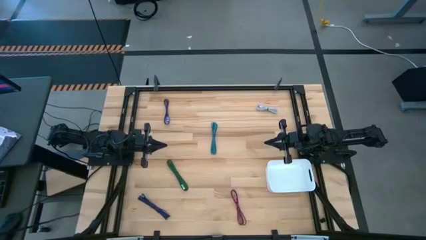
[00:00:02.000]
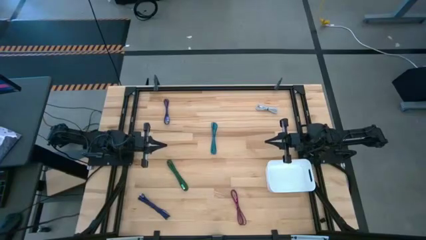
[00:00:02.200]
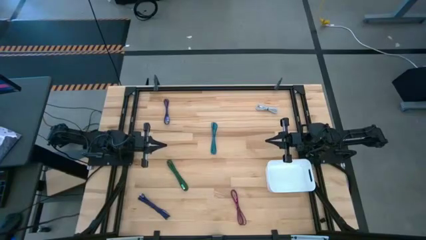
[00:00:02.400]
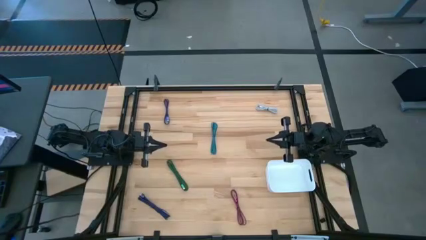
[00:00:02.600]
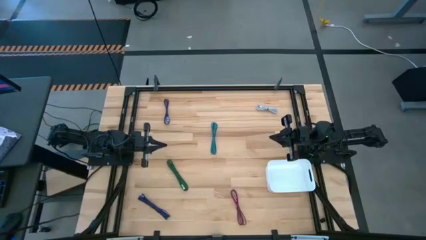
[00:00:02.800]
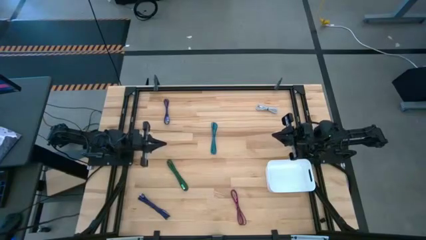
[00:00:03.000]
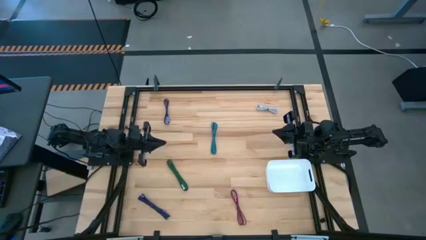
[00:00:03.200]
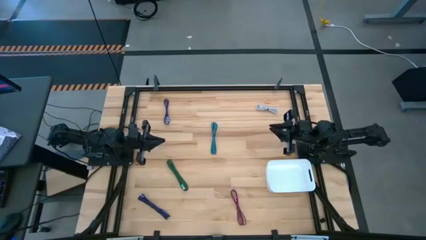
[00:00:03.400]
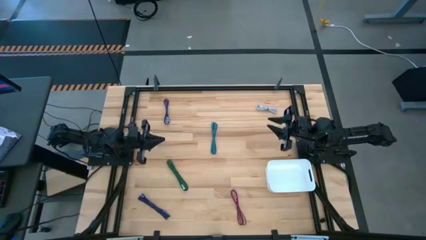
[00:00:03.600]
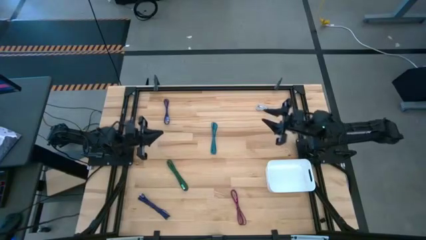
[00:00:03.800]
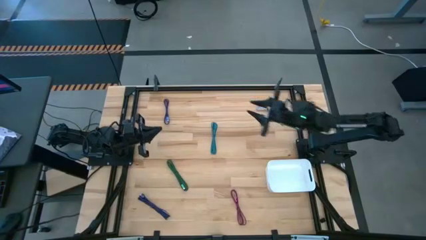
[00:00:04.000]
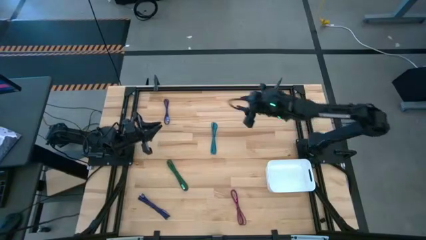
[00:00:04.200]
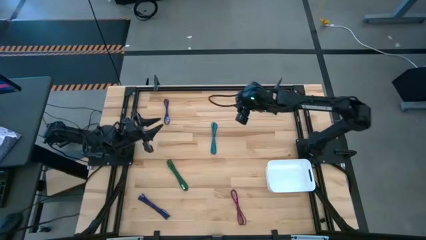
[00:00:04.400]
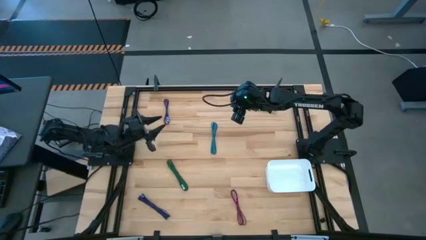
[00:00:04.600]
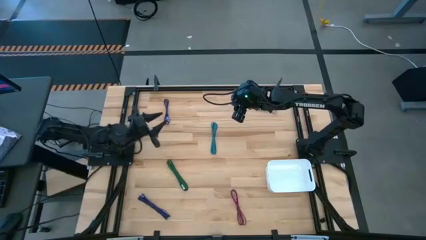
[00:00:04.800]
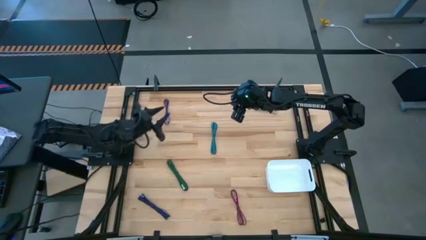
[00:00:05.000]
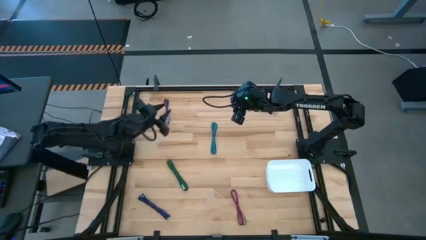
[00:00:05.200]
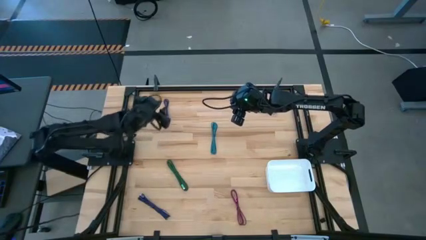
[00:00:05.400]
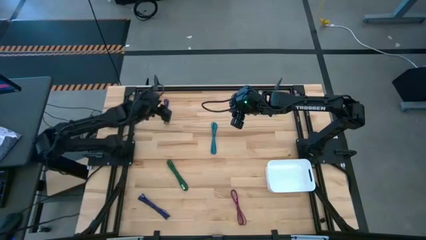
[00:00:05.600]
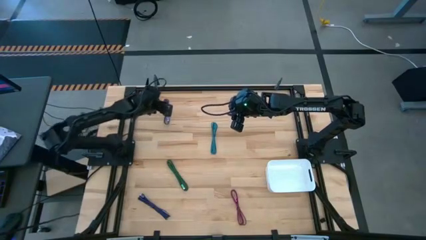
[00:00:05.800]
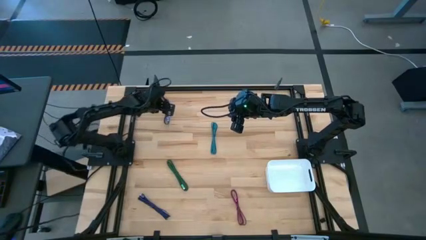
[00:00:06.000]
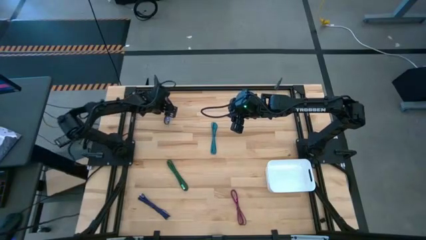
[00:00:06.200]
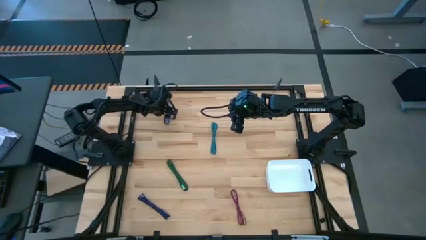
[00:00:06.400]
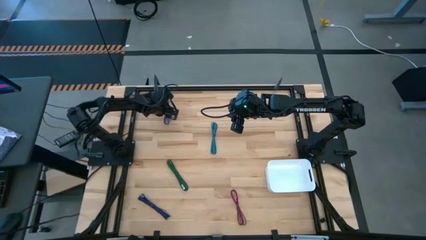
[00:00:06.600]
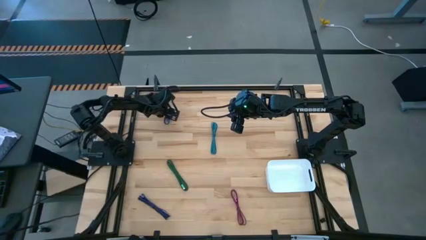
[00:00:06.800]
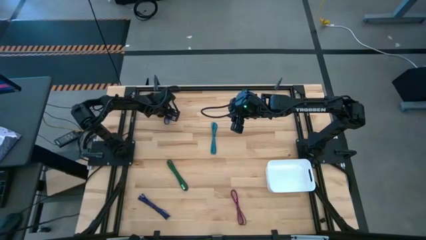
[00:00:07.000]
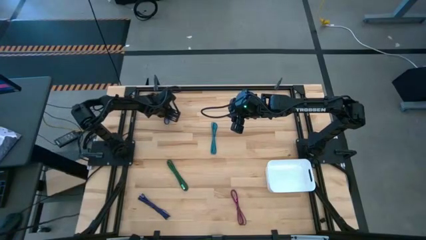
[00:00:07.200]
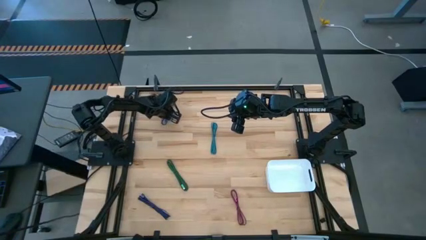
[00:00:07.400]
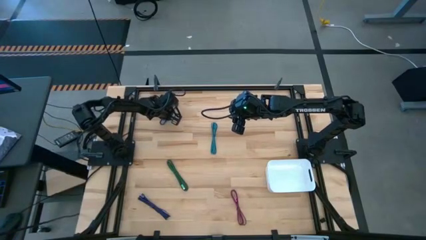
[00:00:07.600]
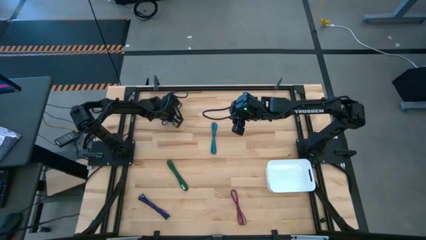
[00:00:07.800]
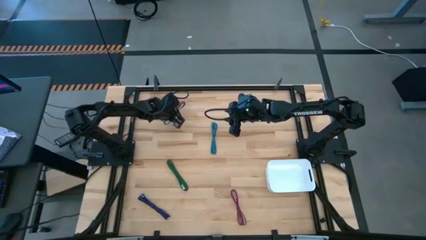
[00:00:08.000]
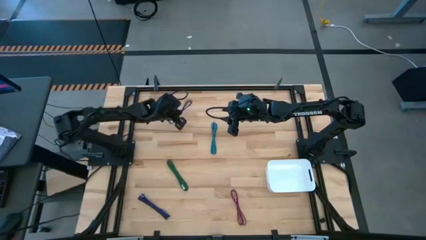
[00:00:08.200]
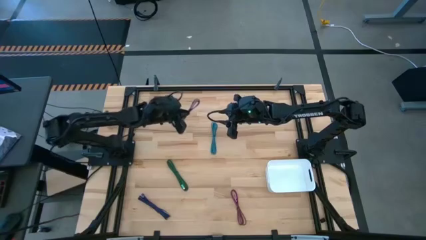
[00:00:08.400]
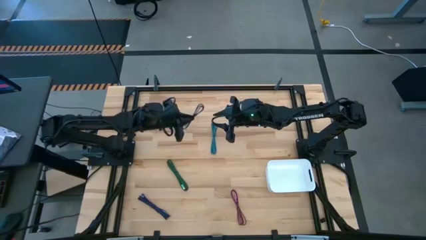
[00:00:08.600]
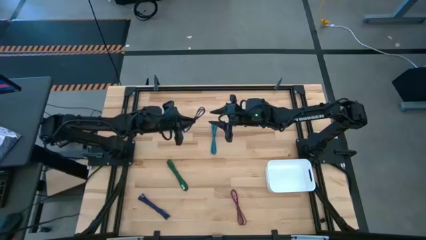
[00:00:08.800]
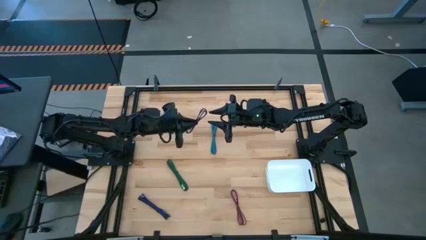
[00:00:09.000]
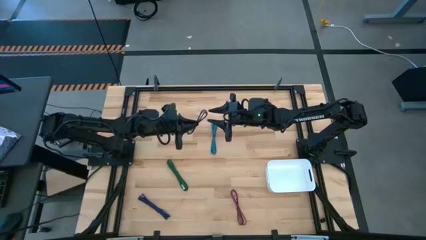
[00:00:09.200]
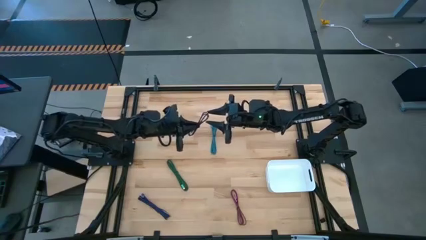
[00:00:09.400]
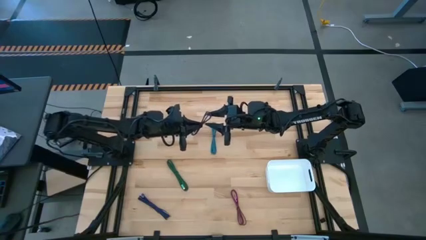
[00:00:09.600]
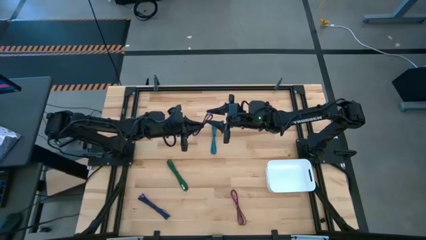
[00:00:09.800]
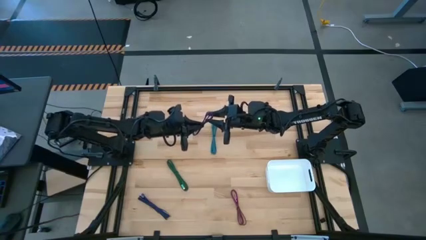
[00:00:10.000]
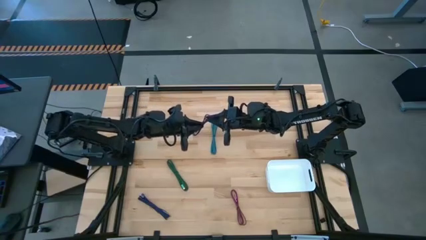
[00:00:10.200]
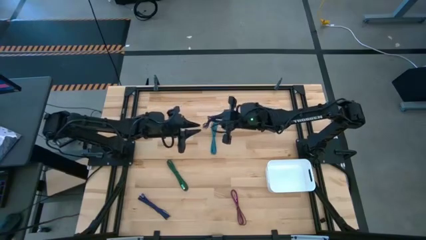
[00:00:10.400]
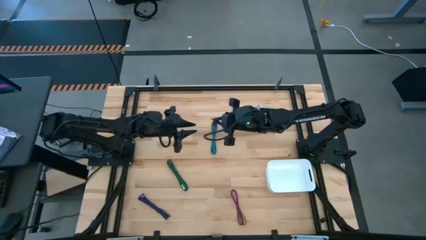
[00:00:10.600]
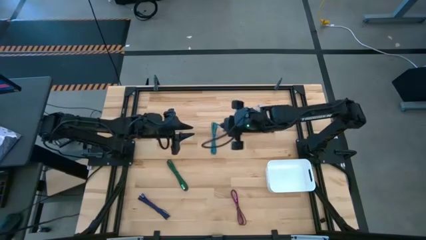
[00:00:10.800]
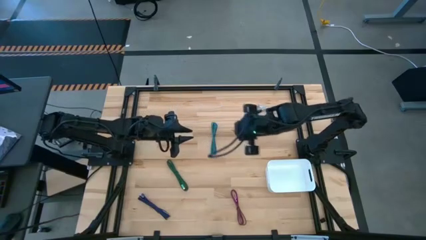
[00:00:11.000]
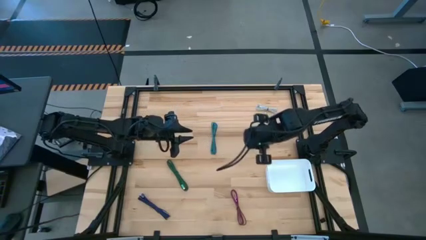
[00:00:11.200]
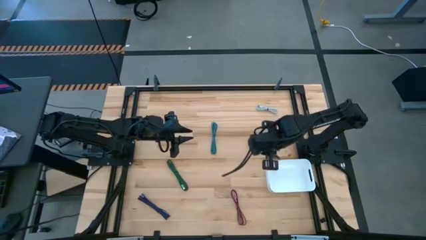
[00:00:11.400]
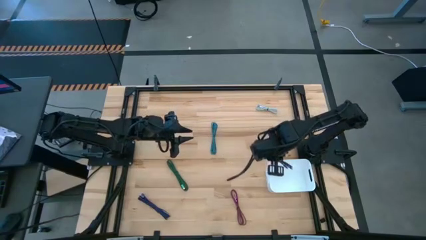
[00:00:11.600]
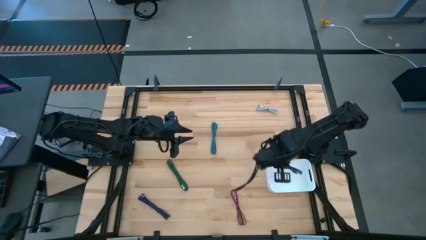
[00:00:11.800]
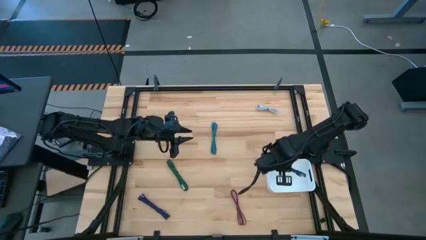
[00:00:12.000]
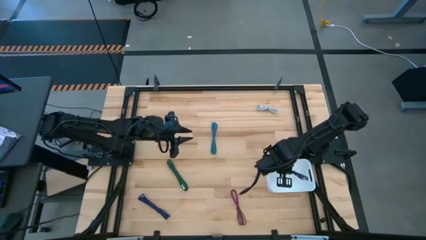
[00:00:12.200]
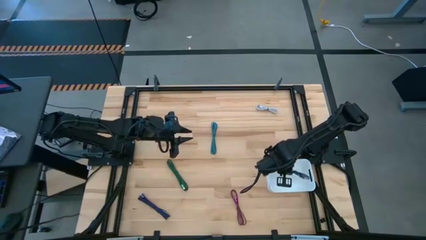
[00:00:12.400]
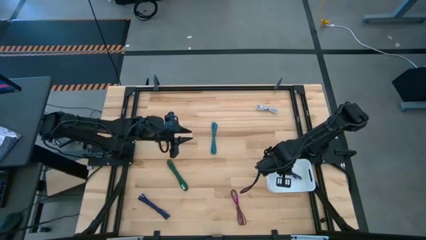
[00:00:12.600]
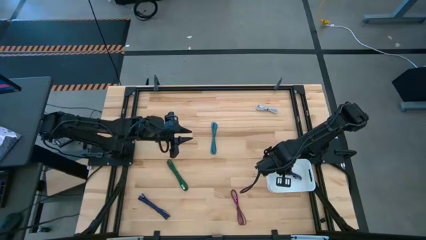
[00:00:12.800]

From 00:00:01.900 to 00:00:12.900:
Task: Pick and place USB-C Cables
Put the top violet charger cable into the white container

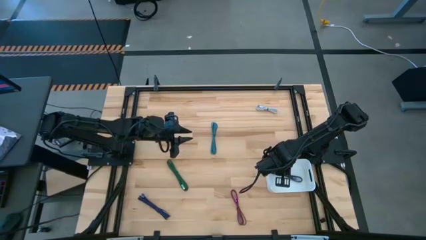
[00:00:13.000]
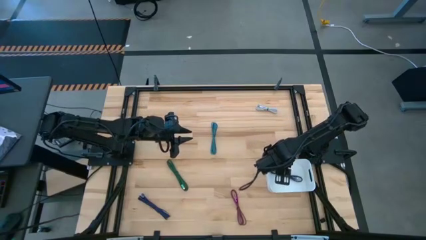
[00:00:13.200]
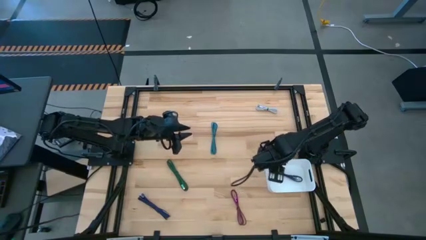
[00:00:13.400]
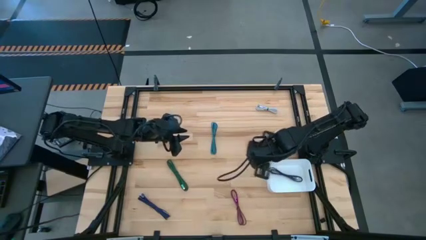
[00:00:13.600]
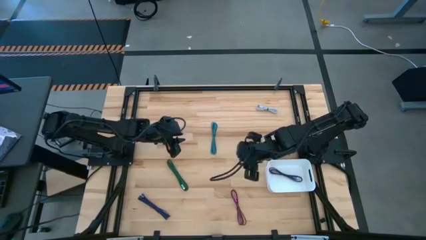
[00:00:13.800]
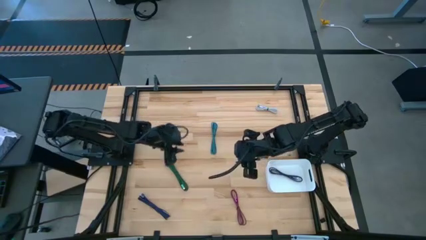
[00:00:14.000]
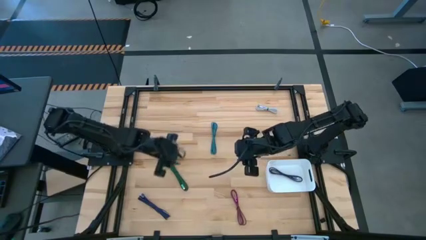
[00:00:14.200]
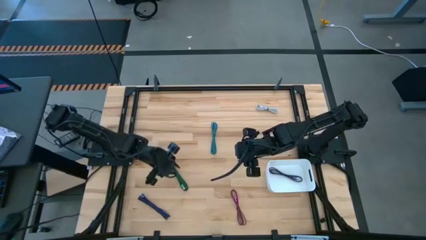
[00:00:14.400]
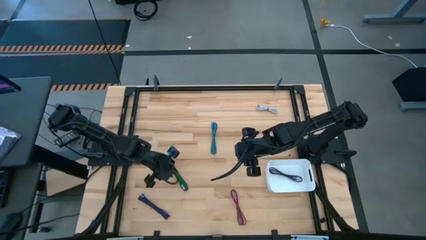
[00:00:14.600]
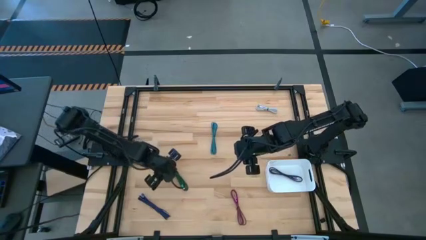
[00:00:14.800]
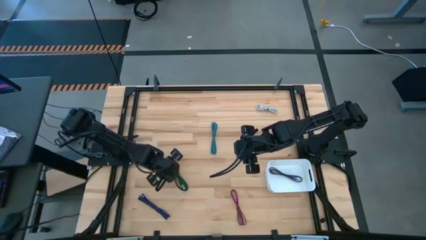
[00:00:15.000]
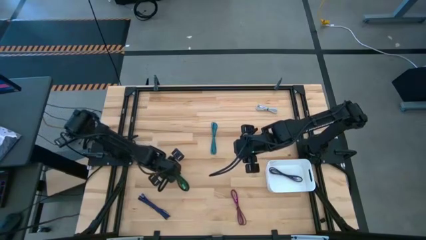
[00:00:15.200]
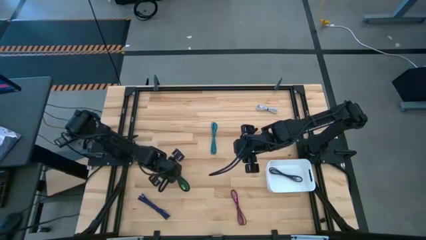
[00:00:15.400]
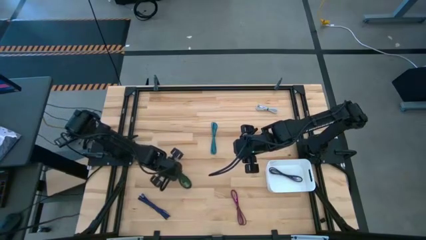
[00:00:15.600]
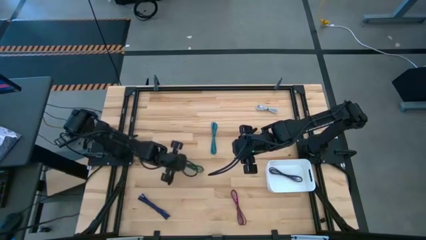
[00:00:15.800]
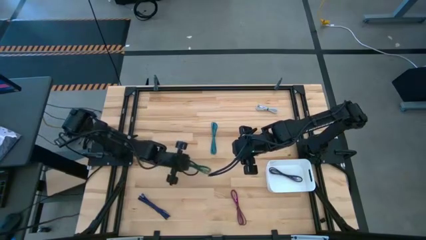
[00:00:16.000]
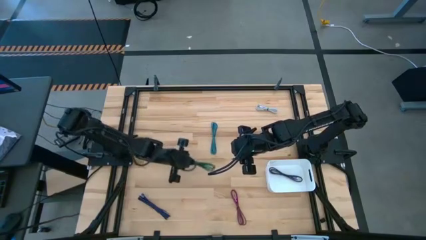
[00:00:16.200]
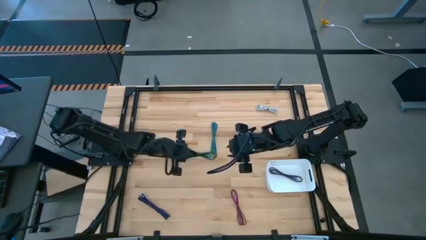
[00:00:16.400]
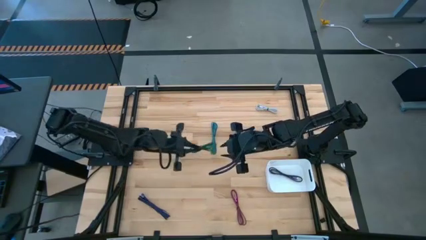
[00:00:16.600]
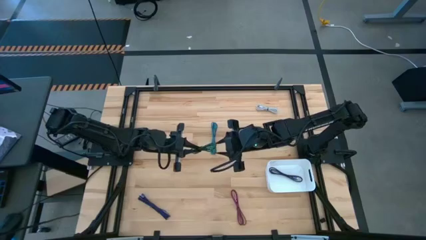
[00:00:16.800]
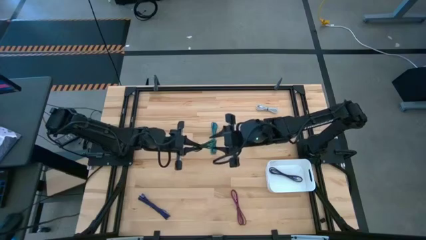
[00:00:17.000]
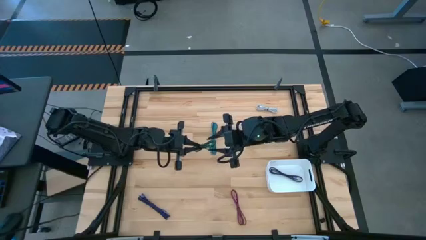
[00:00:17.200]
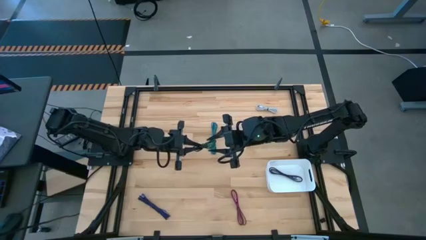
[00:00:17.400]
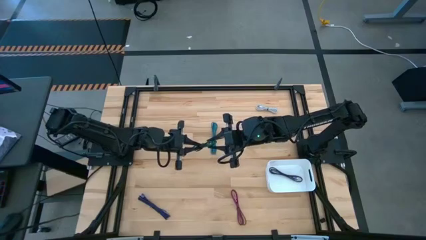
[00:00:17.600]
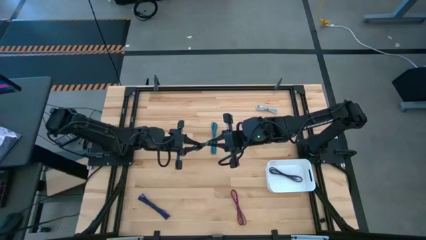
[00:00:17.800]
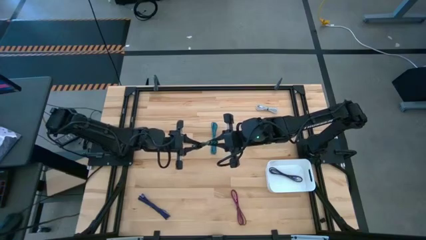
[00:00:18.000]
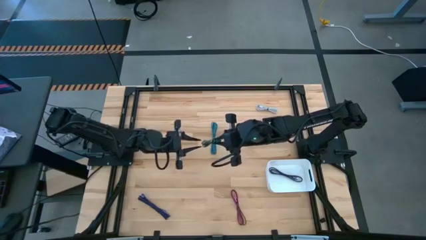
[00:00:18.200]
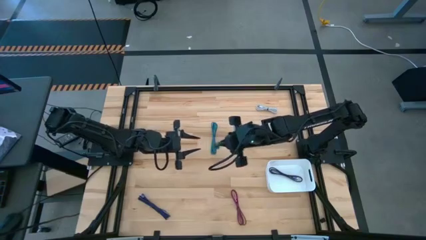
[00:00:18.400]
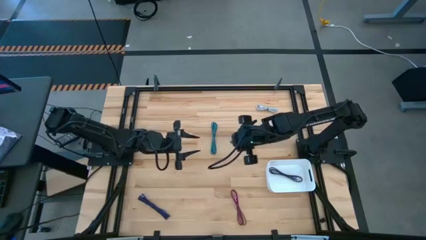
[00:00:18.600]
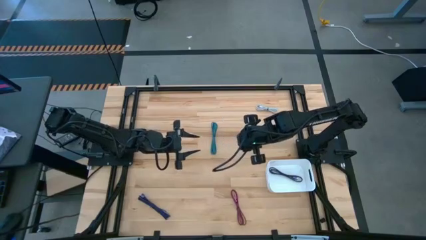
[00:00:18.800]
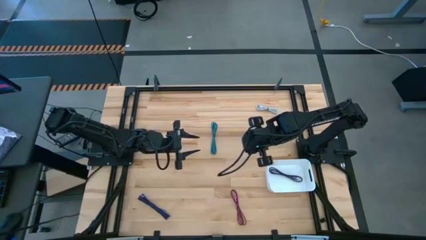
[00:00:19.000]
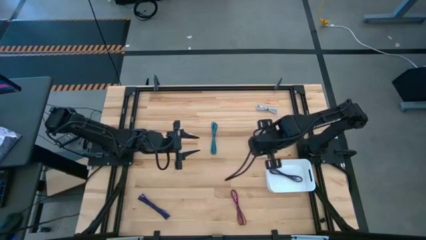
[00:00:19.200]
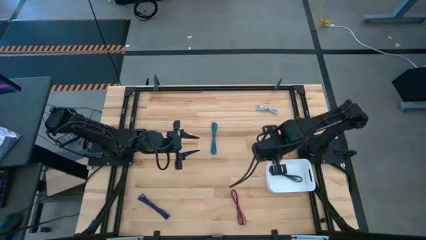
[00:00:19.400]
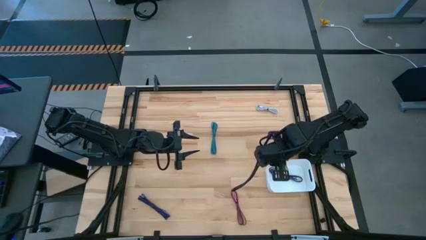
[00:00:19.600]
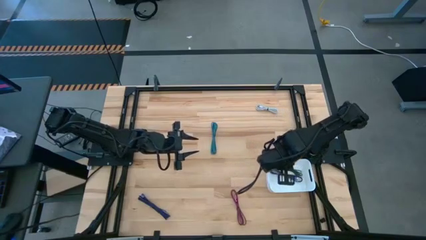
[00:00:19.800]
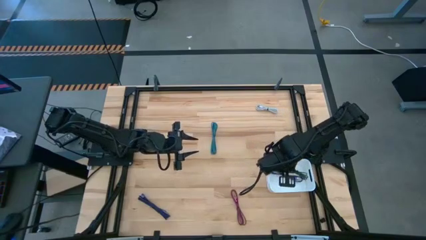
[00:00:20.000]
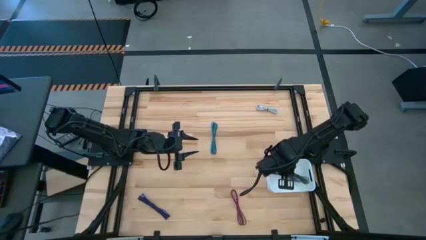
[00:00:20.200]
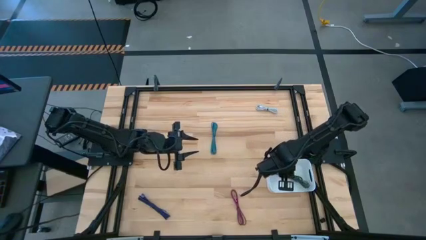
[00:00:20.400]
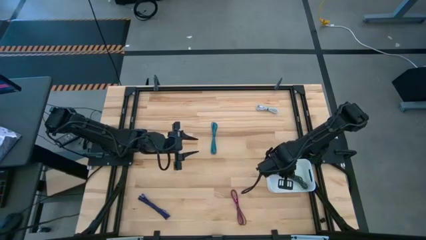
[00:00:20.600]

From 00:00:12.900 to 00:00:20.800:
Put the green charger cable into the white container
